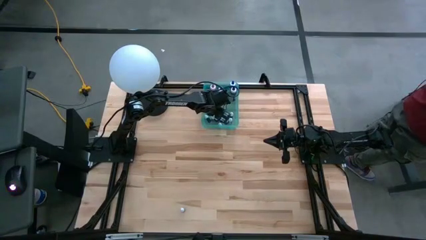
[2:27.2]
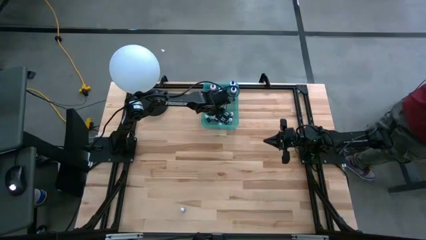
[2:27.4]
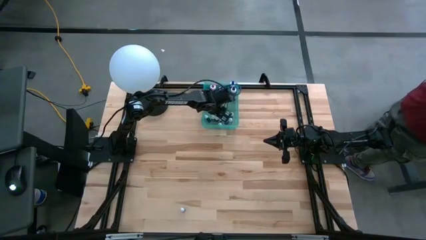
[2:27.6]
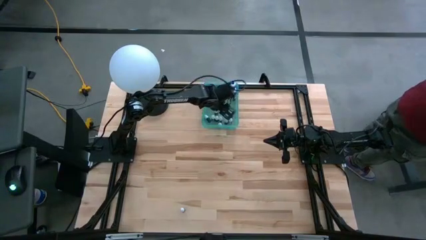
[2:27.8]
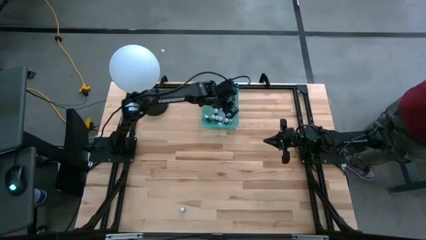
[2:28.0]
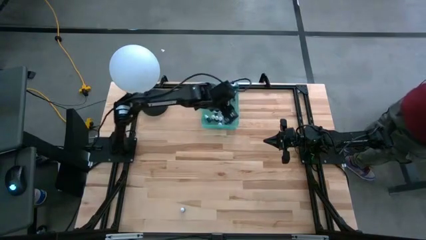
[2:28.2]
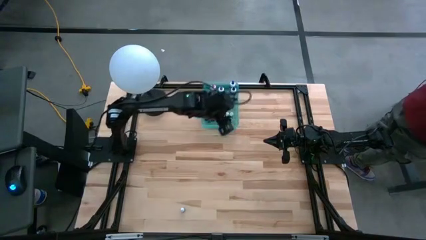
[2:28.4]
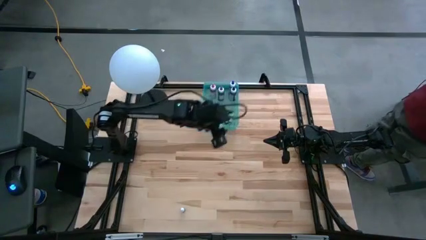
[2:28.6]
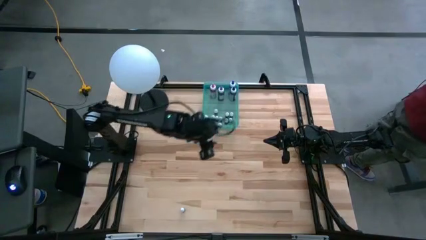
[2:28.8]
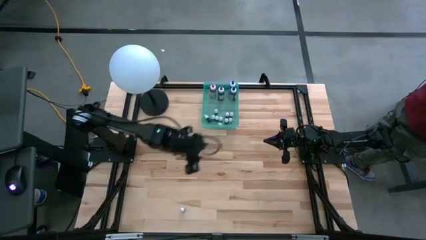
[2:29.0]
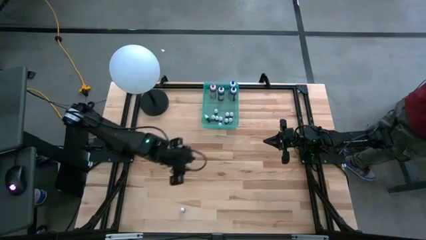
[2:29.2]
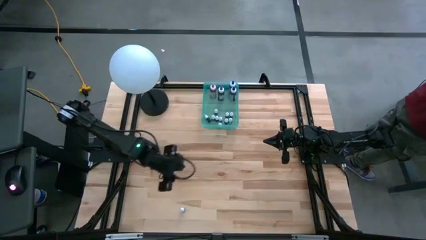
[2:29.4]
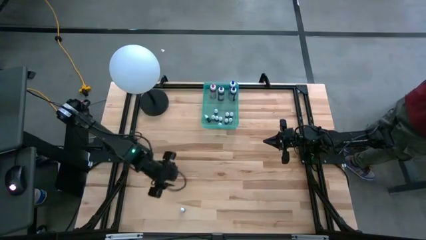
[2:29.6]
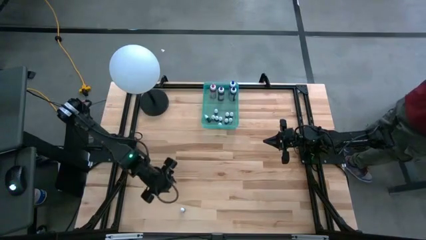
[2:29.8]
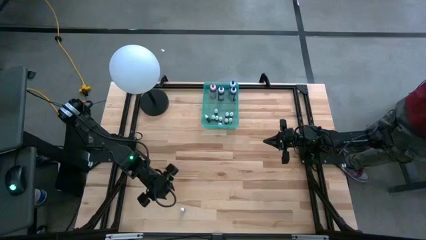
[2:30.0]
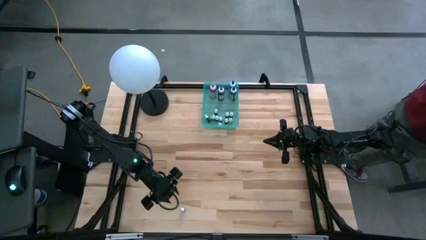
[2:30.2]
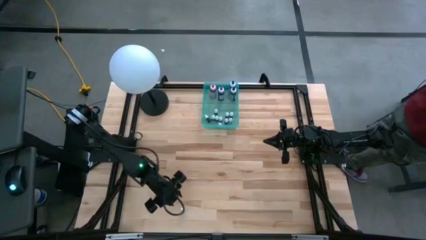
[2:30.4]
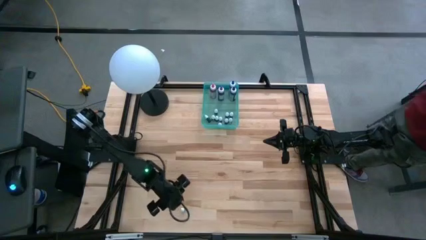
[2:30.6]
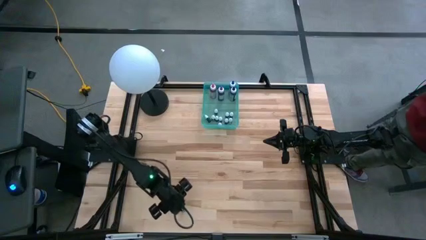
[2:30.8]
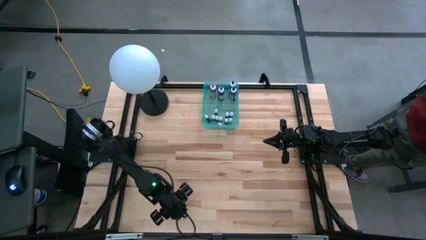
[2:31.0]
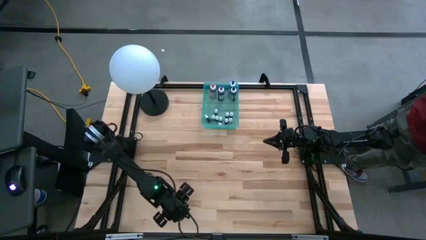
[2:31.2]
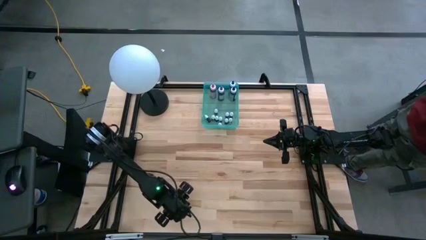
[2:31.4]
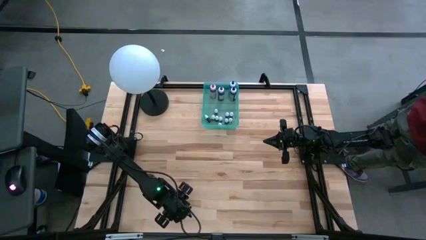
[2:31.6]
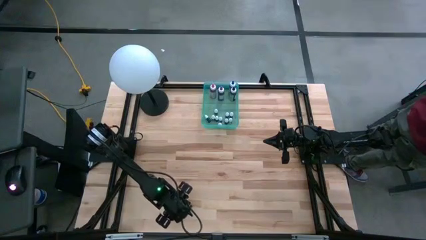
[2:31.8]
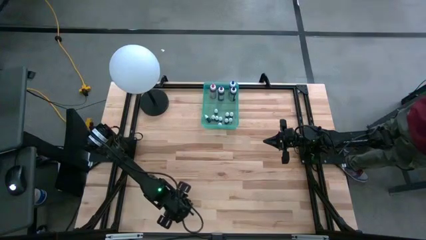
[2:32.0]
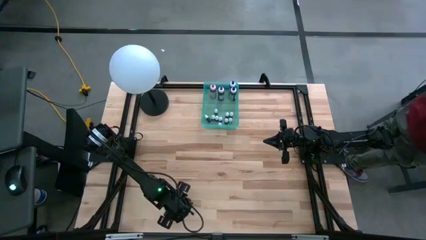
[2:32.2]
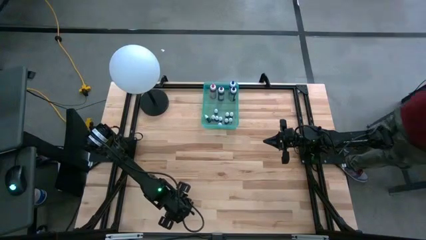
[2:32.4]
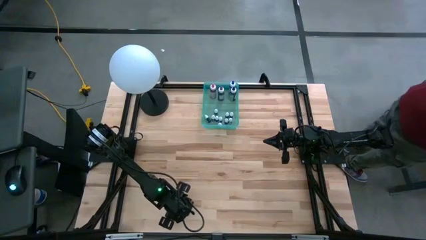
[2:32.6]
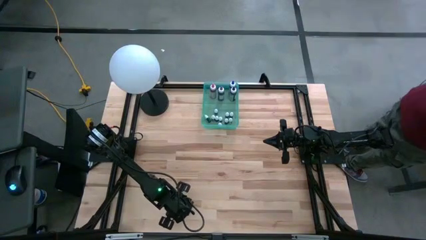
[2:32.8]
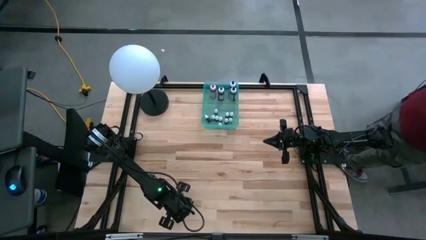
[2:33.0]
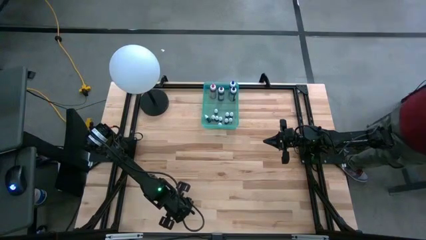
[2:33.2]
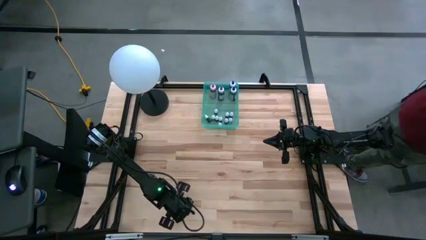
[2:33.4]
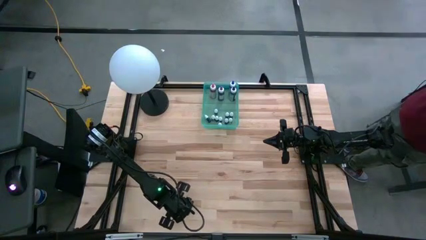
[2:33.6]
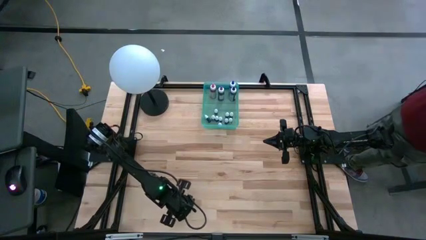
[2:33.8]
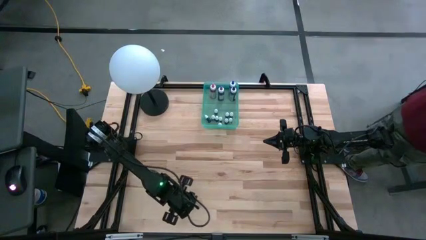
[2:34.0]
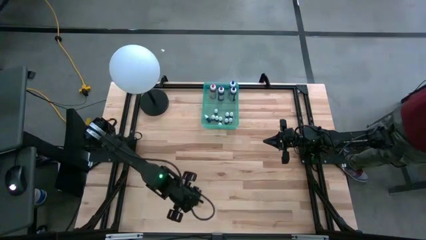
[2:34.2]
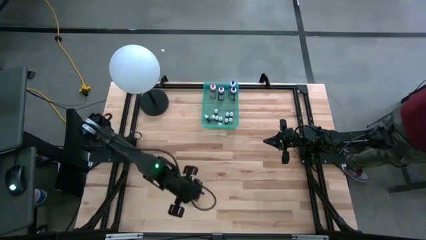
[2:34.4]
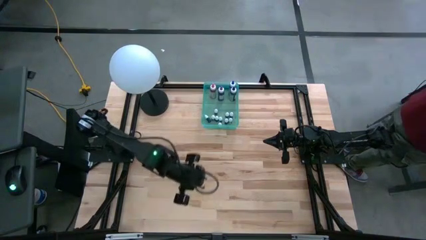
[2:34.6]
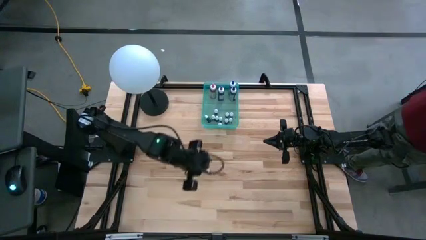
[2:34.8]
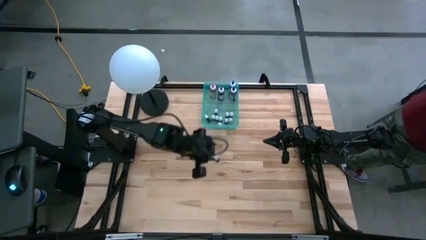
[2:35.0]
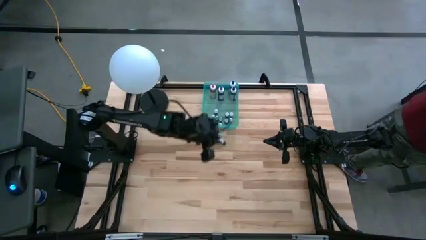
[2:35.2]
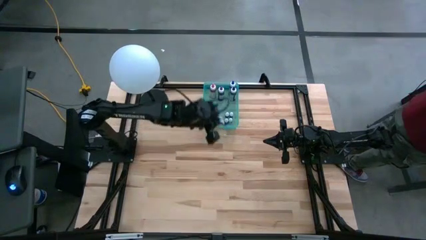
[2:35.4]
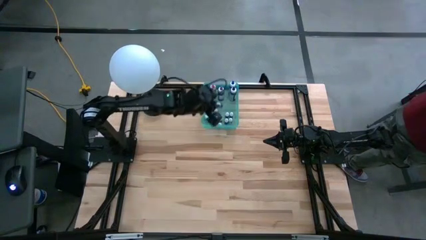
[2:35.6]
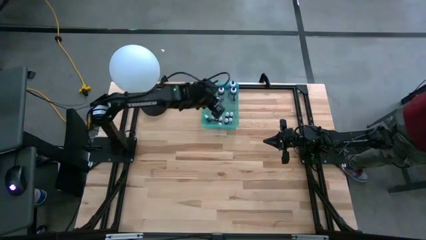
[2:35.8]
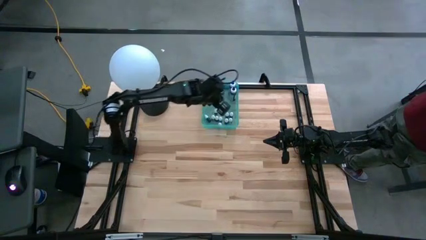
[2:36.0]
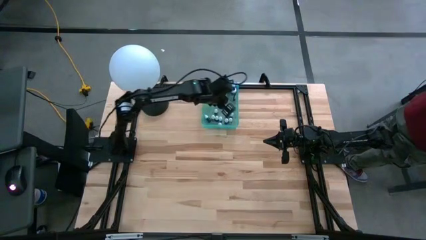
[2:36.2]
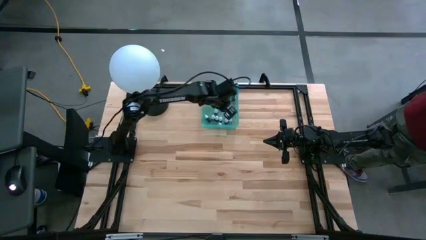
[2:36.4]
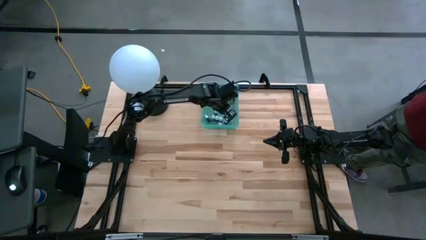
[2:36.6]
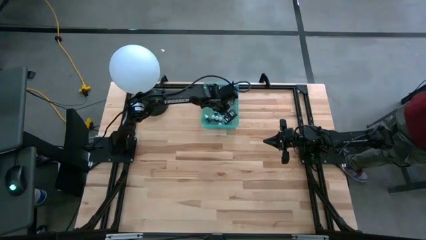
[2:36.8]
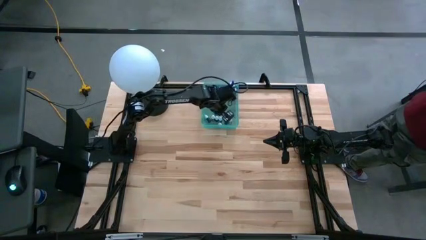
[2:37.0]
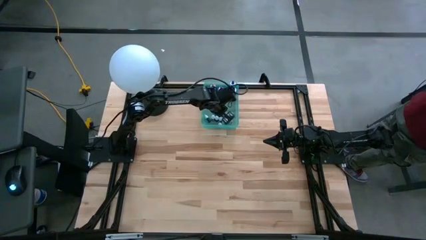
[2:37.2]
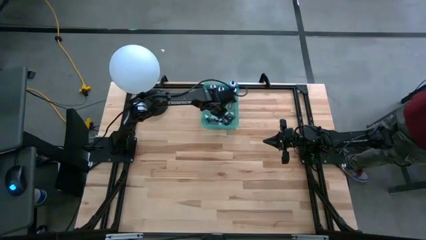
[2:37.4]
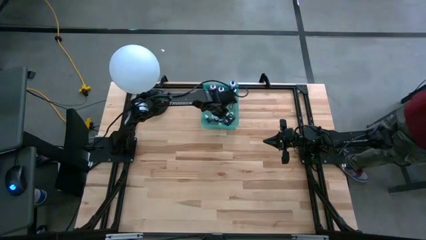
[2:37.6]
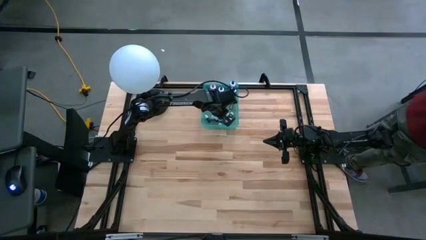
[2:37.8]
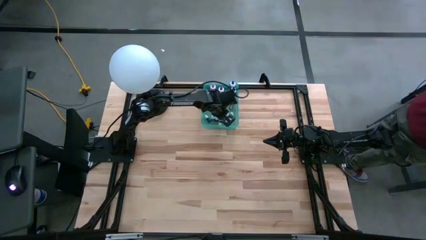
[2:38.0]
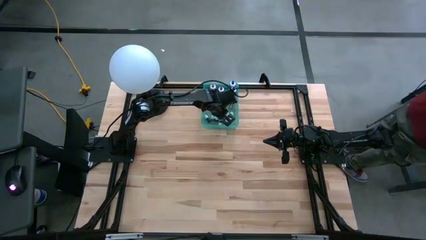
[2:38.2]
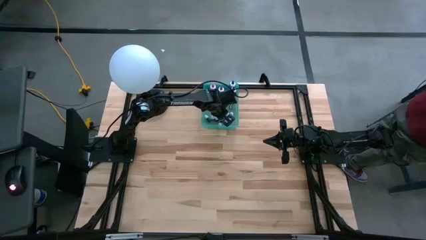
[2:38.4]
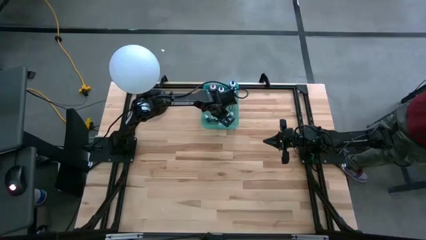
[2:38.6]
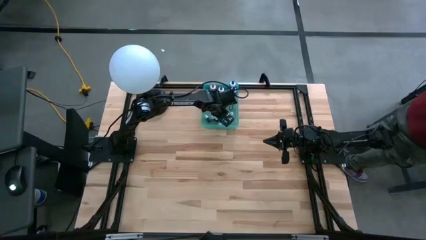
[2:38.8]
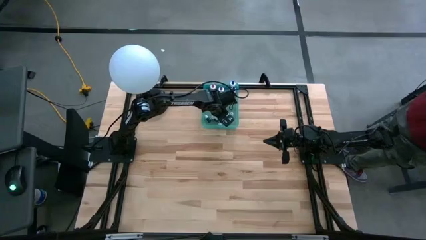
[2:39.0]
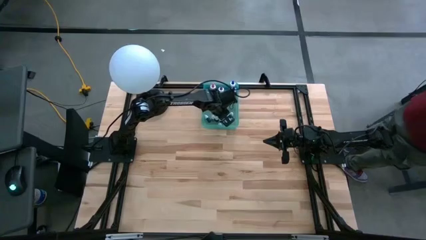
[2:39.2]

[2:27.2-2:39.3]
Task: Pick & Place food coloring
Put the small black food coloring bottle into the light blue bin

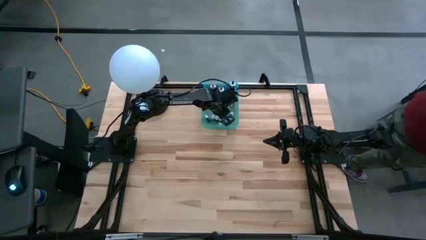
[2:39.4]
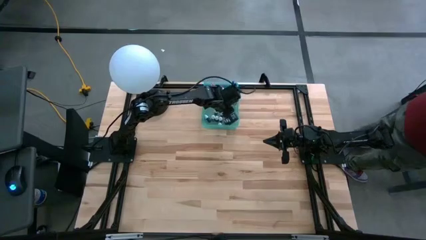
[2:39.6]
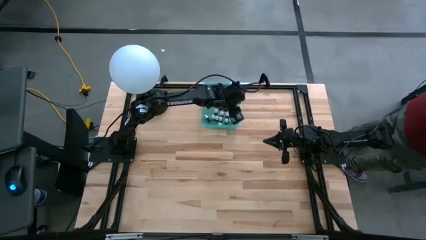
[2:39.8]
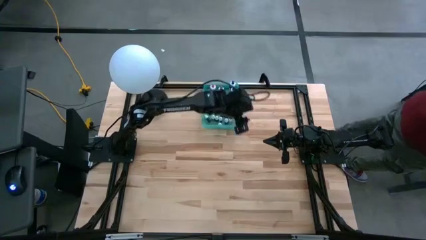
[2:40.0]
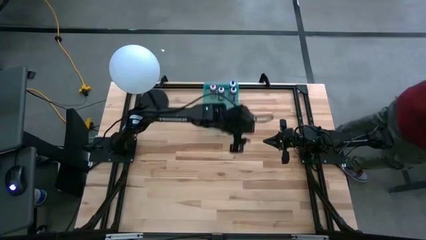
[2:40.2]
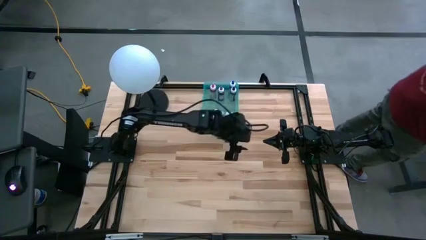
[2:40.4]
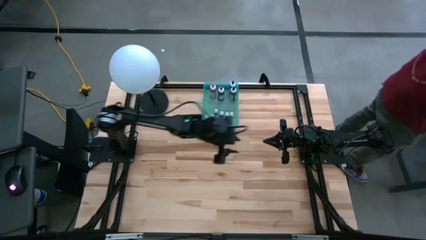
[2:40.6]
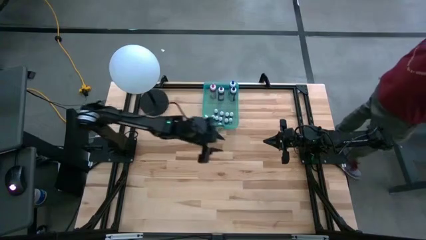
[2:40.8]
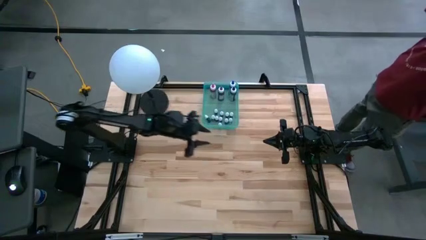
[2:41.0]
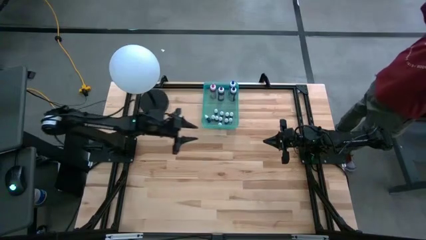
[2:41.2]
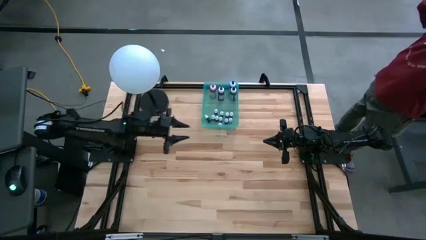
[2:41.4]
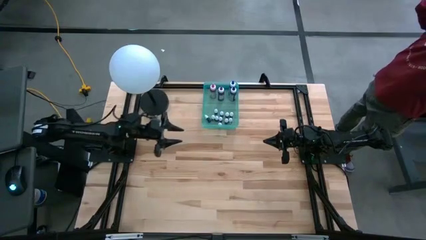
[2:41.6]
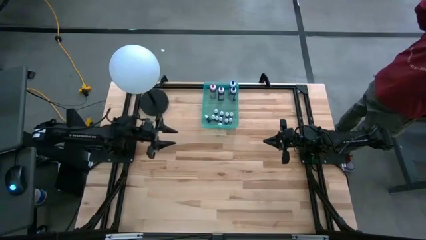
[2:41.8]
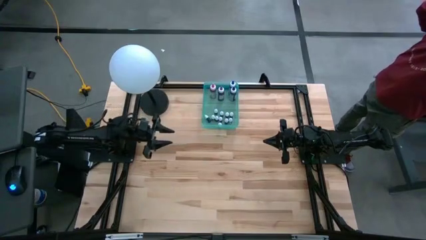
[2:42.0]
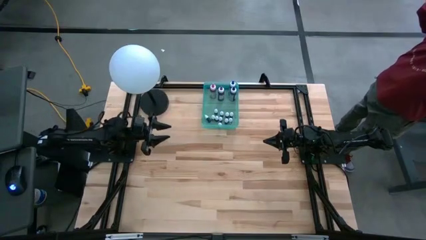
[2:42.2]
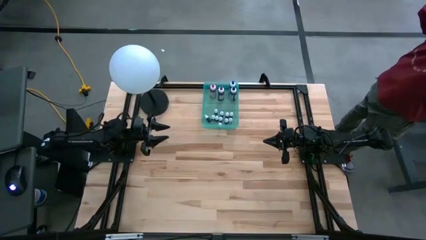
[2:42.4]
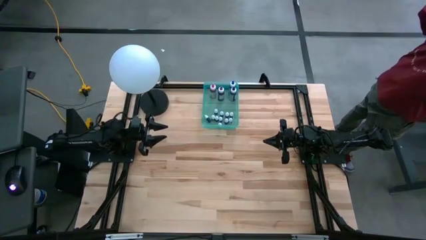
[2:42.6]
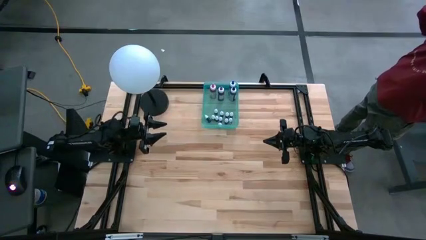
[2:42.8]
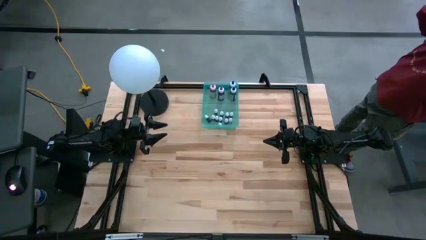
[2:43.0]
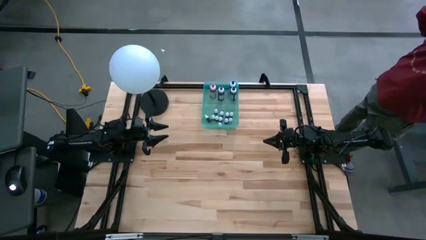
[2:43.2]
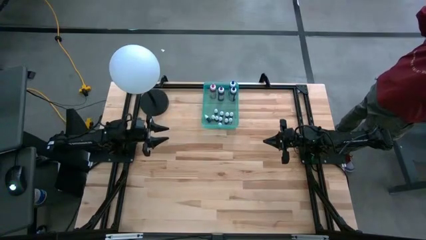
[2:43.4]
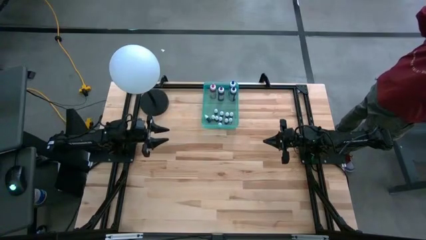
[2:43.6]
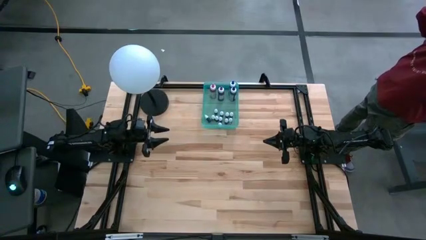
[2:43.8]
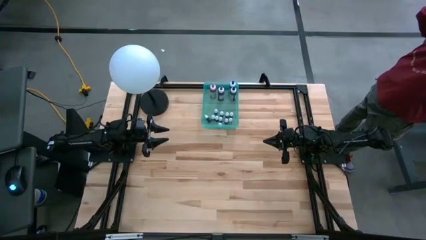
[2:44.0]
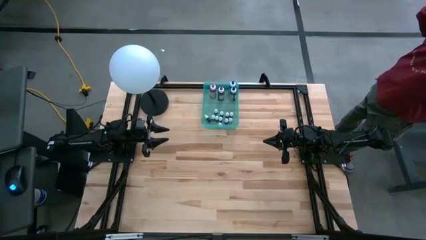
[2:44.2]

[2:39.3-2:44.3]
Return to Home Position
